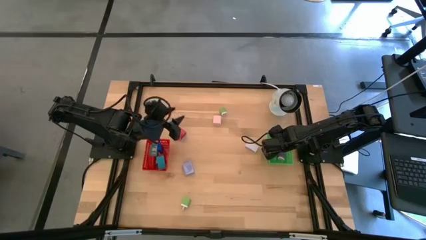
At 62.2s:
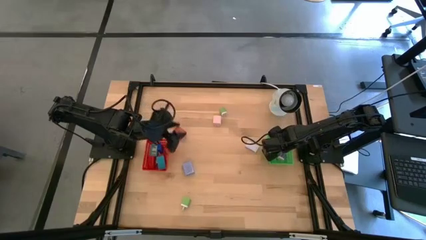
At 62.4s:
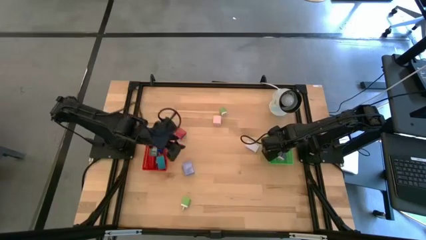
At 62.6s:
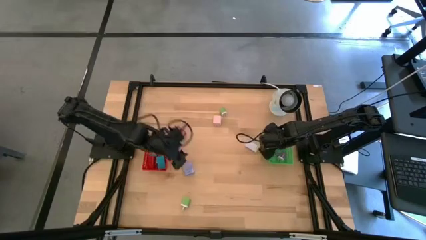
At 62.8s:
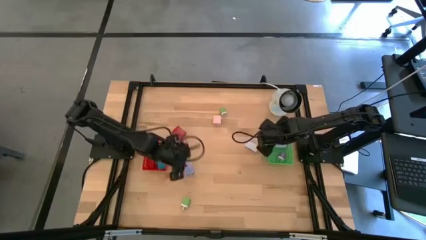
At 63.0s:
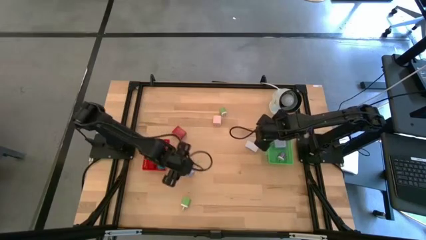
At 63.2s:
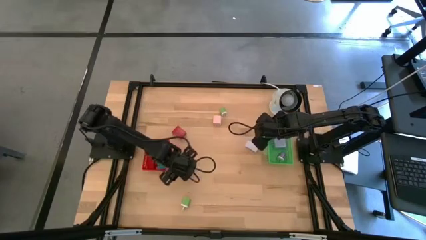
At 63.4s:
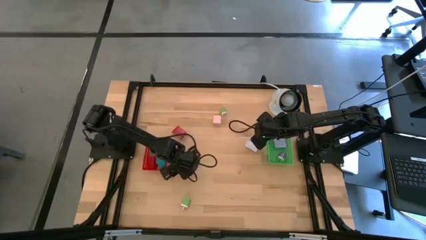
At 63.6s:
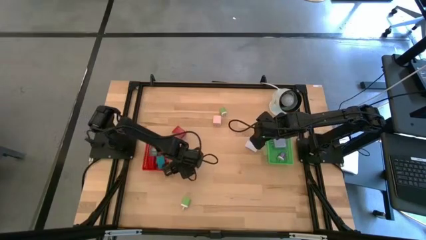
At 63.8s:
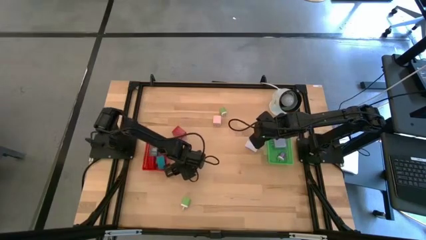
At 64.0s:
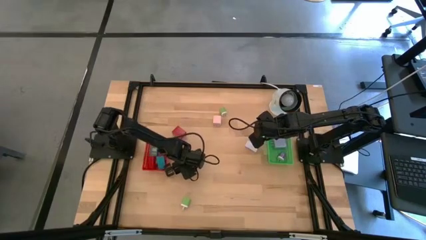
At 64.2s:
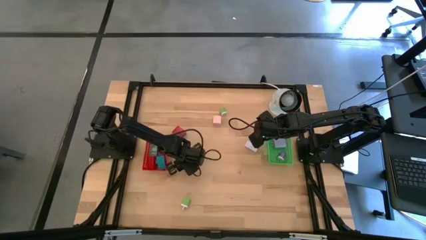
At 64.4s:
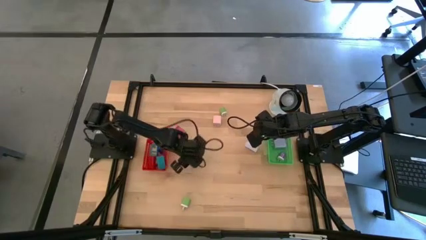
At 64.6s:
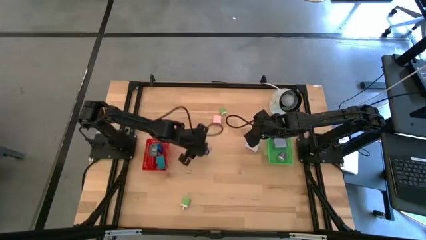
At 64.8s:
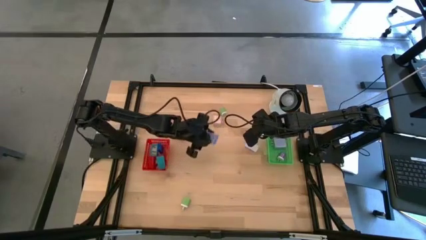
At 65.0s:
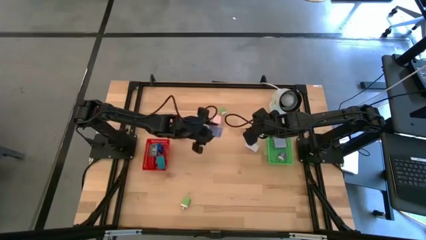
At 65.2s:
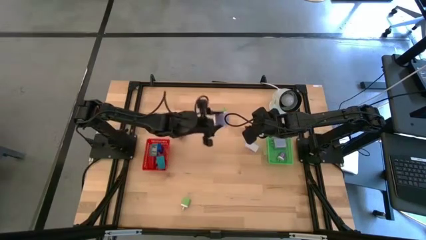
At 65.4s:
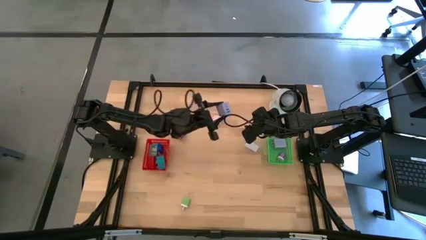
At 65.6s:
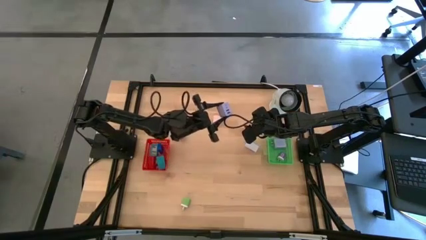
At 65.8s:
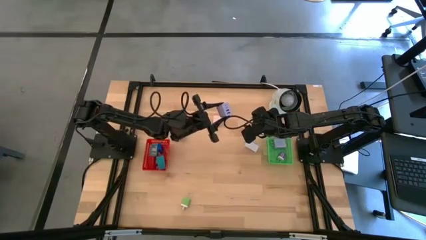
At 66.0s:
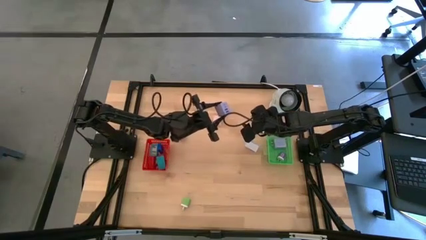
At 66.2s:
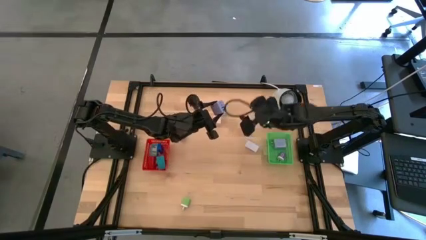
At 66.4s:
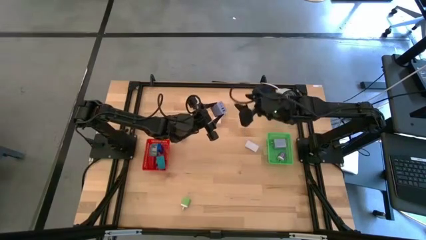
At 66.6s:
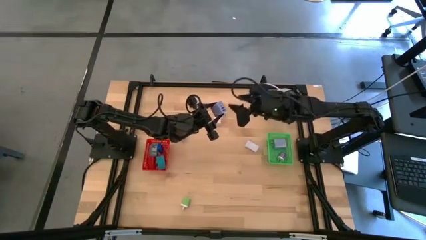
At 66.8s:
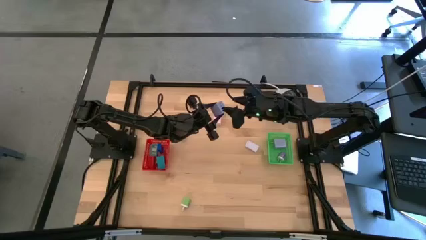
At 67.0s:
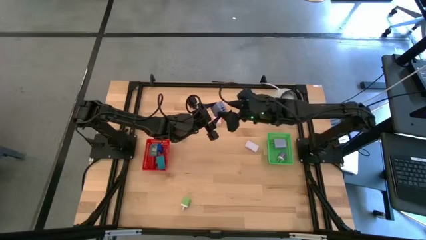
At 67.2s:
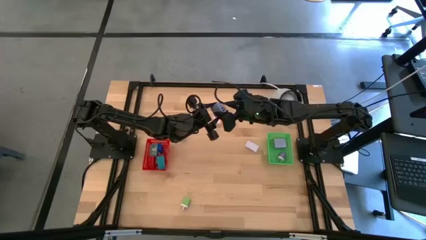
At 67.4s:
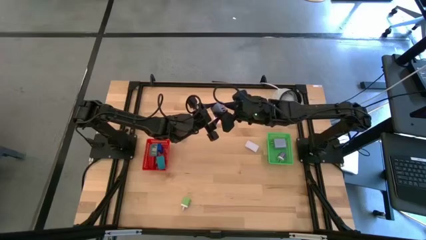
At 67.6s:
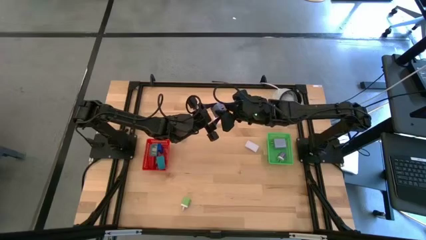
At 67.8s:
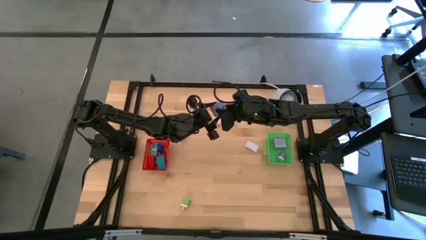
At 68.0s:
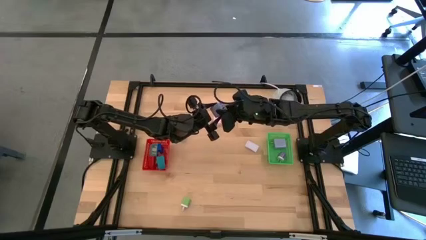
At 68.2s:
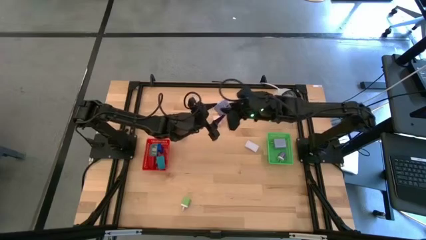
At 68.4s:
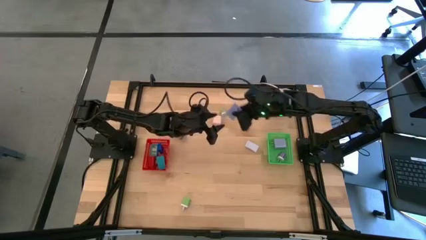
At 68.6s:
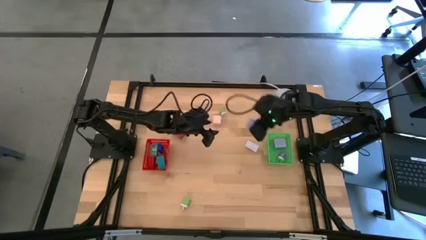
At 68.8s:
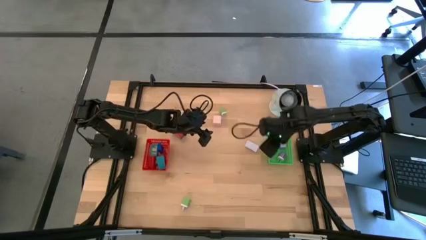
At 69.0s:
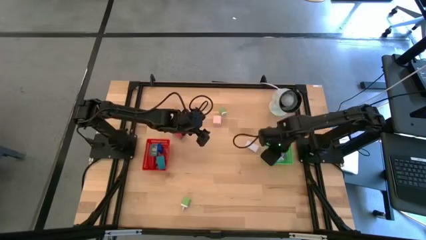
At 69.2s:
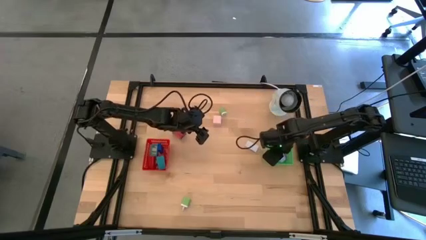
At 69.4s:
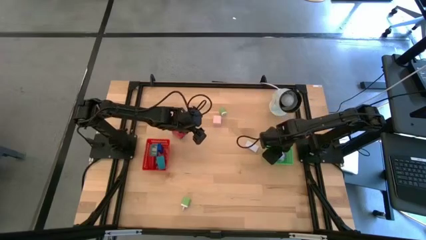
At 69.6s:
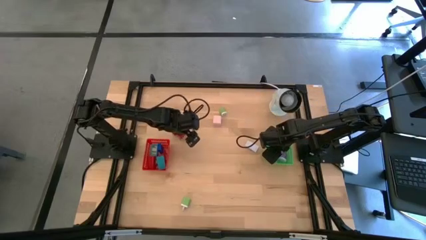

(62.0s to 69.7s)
Task: Pick & Place Office items
Put the bottom light blue charger adapter into the green basket

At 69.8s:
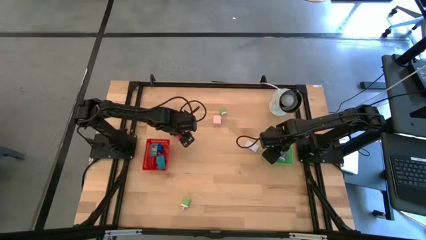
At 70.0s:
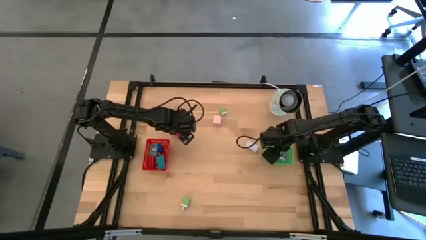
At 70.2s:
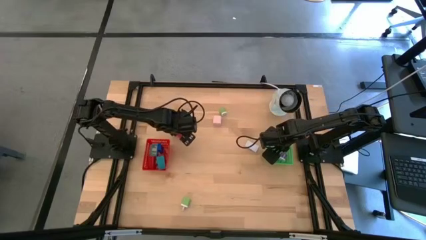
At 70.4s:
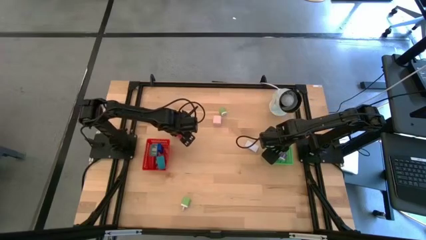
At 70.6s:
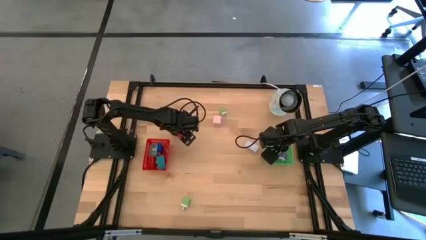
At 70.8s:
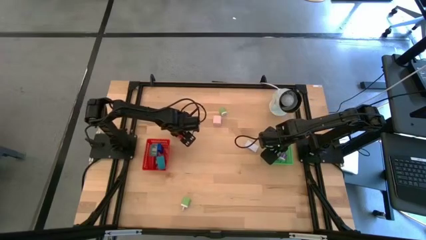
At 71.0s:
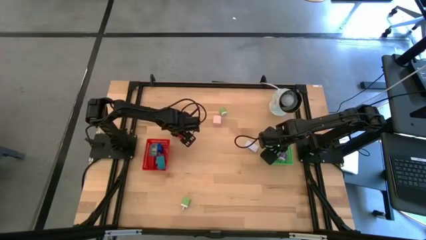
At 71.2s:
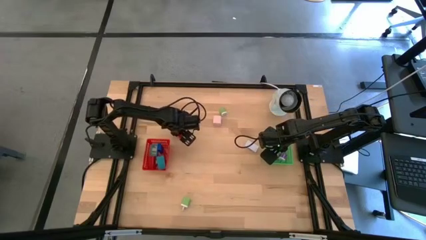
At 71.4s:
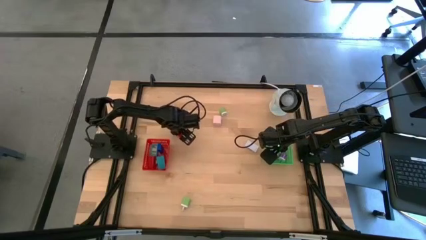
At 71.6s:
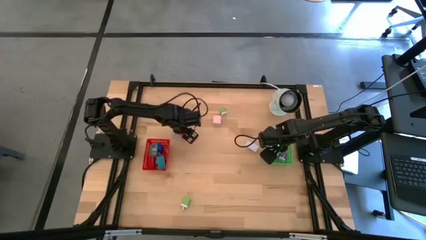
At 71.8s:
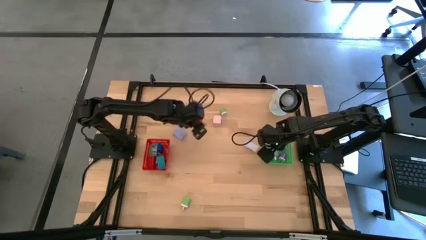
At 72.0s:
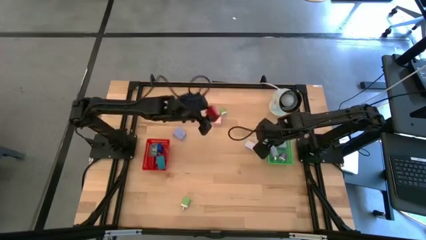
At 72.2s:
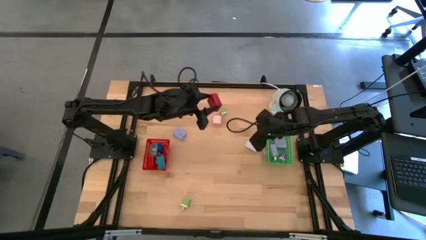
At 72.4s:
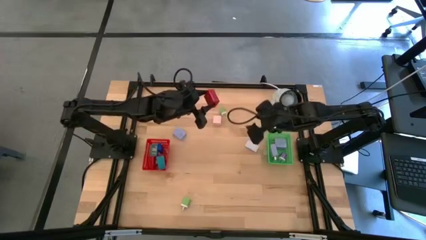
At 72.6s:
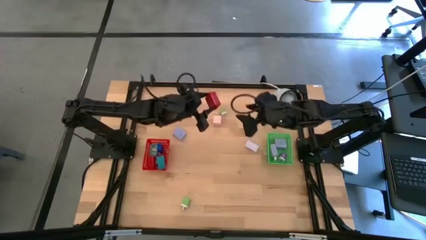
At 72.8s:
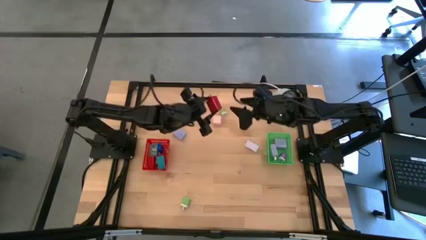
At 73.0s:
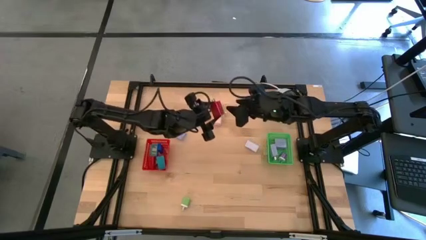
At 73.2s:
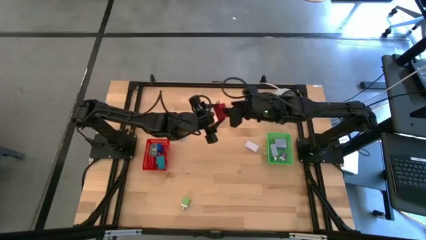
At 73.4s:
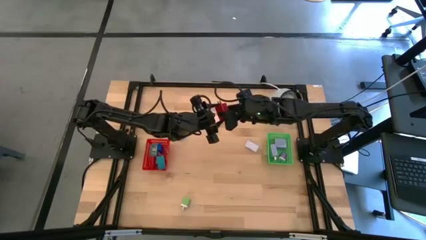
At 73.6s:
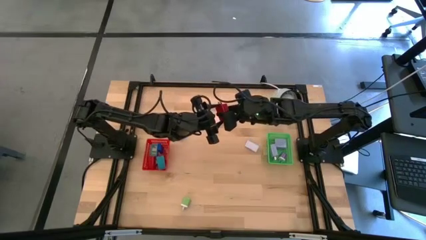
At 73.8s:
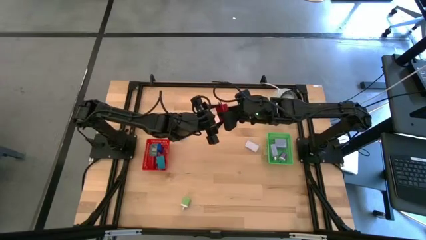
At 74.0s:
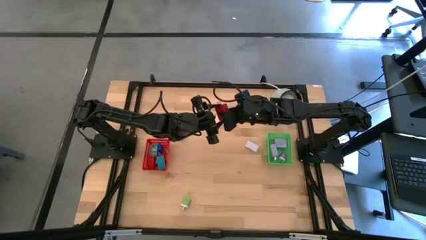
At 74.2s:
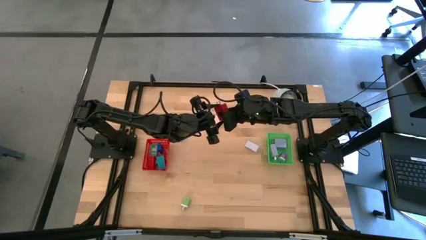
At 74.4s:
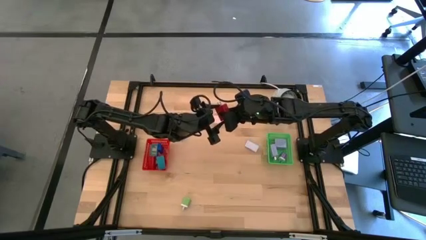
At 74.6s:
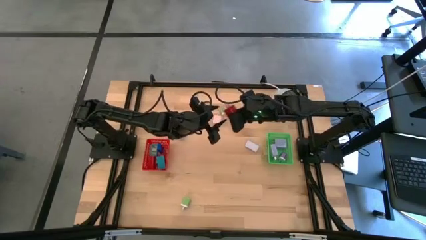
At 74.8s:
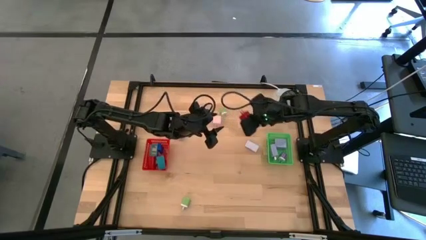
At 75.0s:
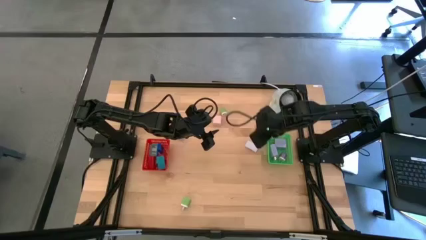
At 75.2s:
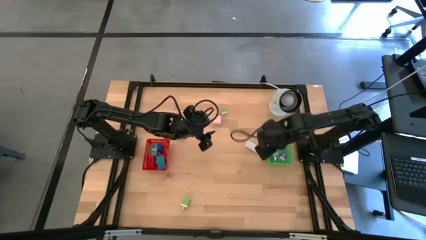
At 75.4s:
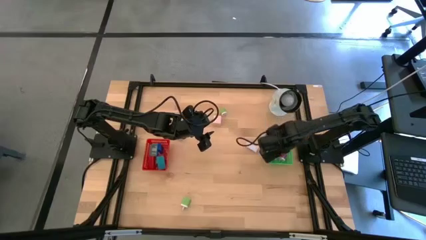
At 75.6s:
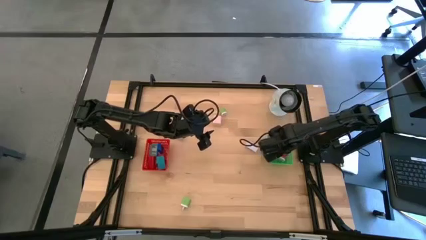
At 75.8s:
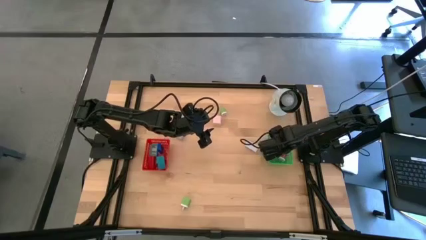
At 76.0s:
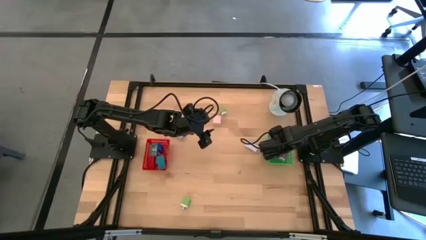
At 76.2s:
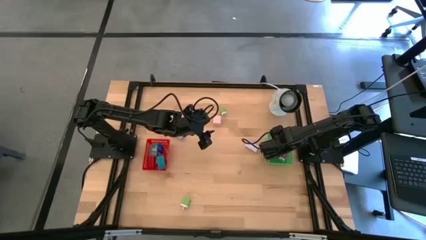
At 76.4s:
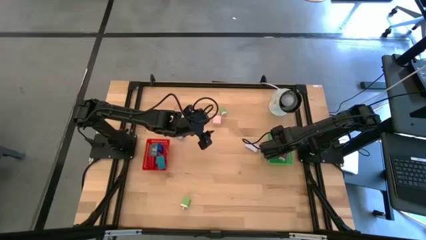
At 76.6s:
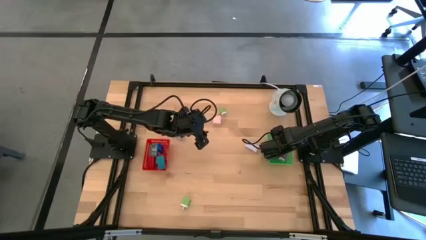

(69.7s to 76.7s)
Put the red charger adapter into the green basket

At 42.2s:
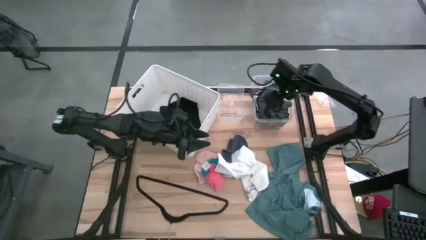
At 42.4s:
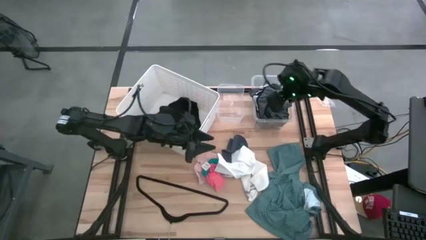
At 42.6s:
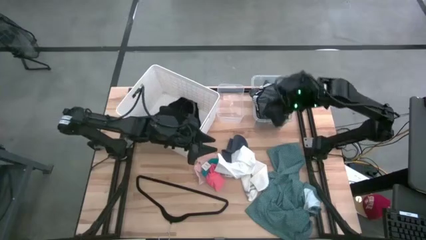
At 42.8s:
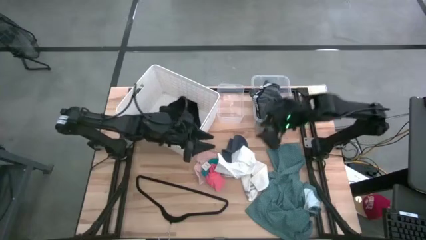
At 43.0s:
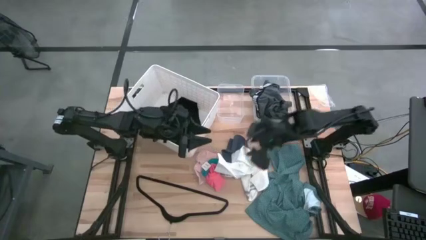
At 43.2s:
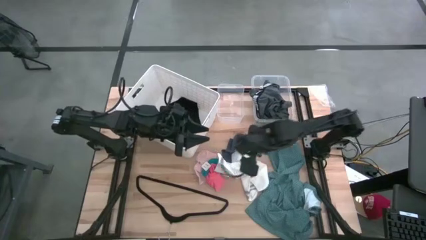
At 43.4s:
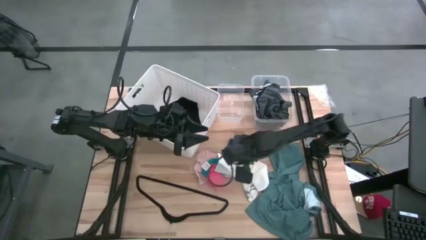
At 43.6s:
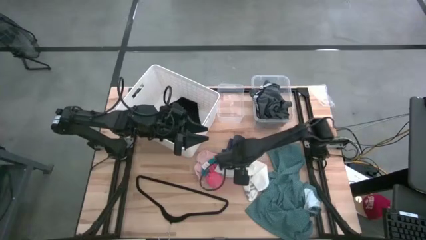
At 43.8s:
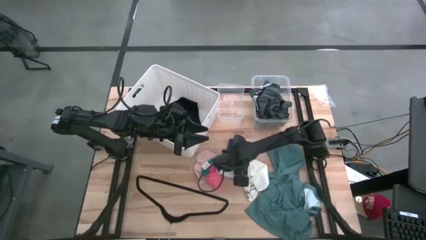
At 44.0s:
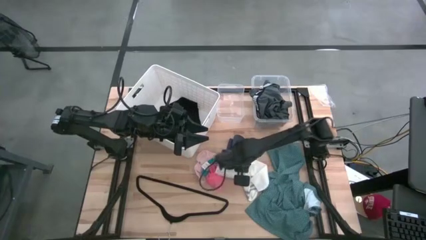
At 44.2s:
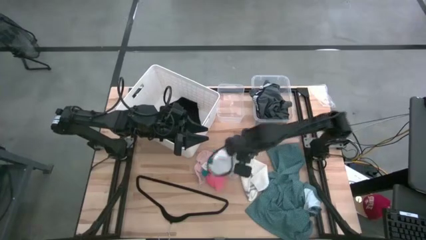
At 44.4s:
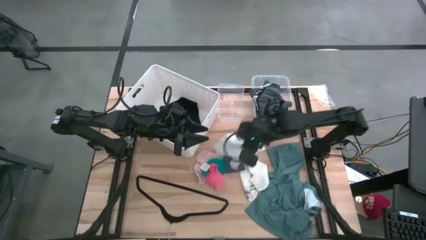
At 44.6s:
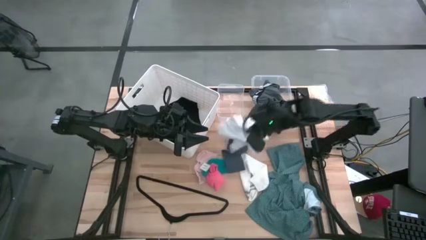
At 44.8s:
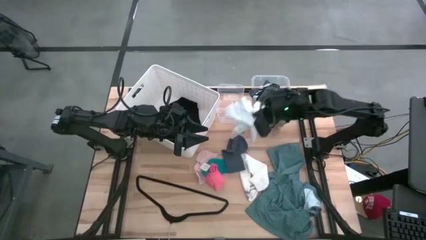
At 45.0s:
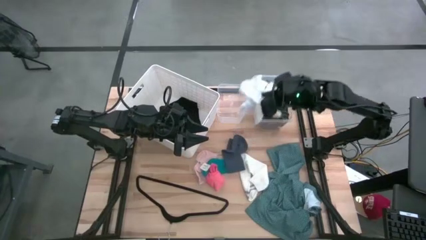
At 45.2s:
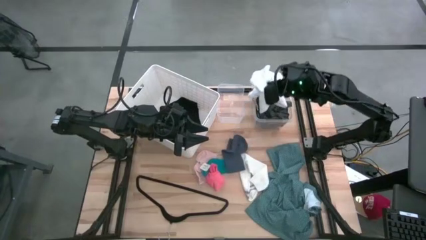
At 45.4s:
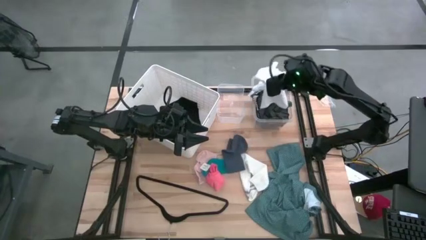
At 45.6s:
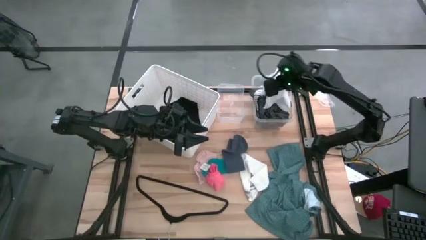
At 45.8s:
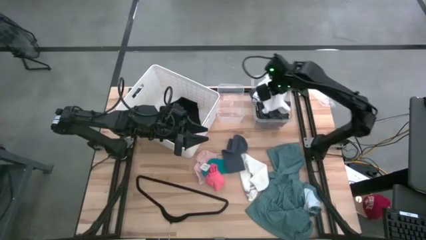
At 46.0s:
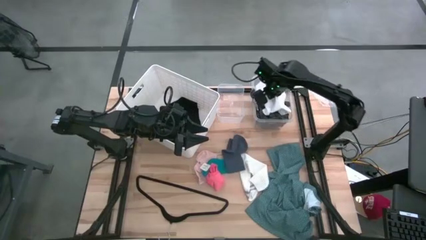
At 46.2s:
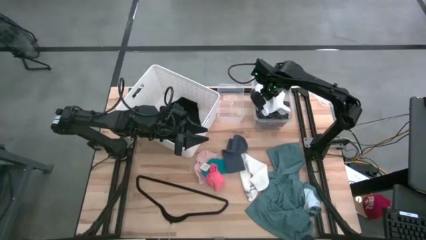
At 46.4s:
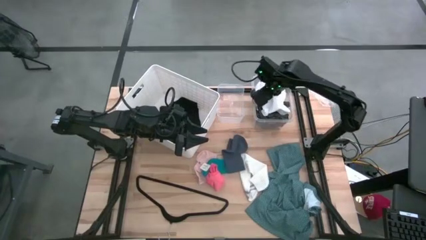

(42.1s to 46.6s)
Task: Pick & Place Cloths
Put the white underwear into the right transparent bin
